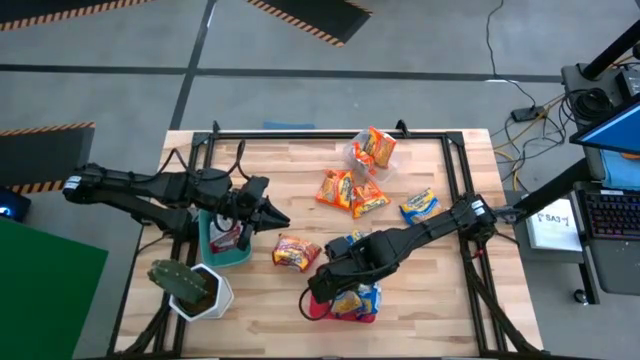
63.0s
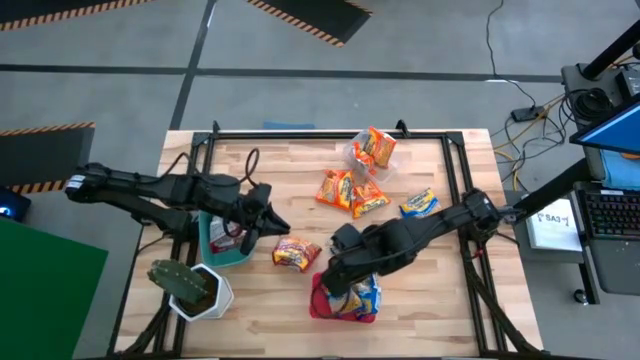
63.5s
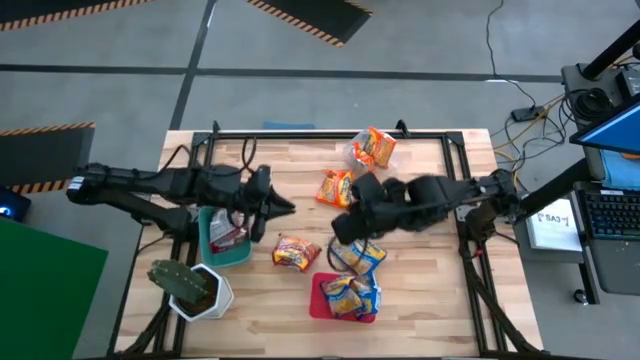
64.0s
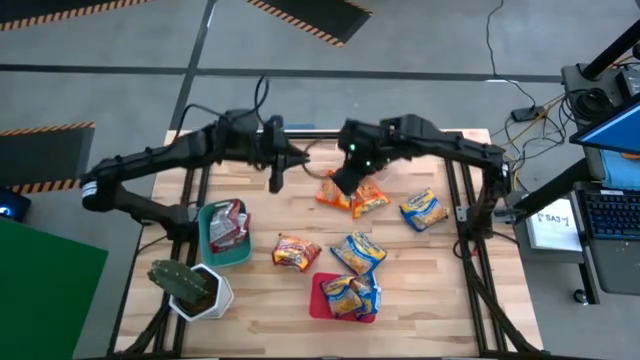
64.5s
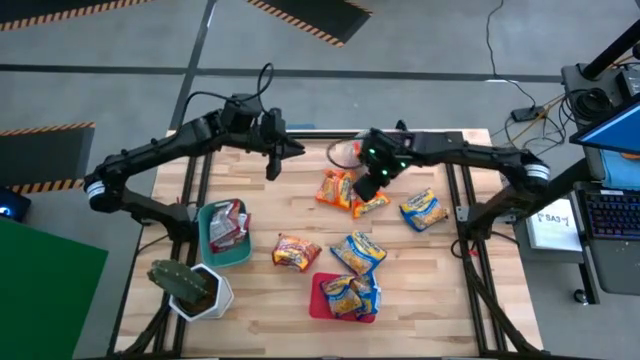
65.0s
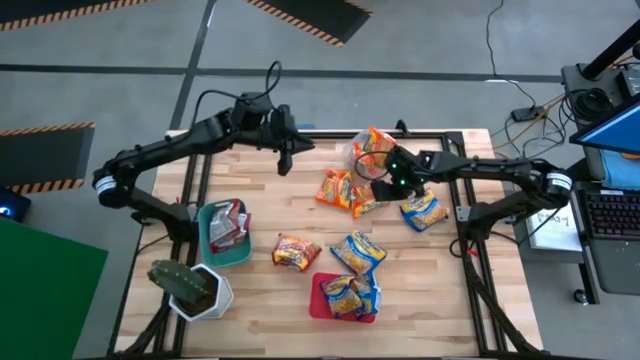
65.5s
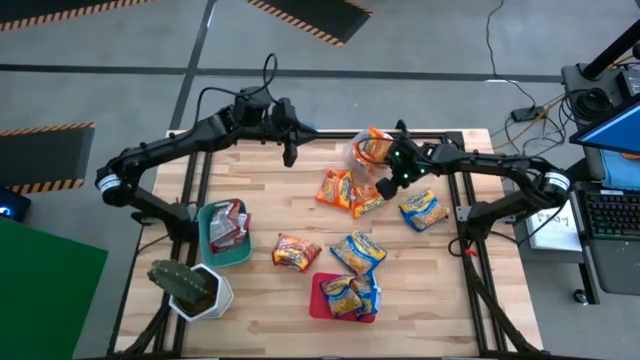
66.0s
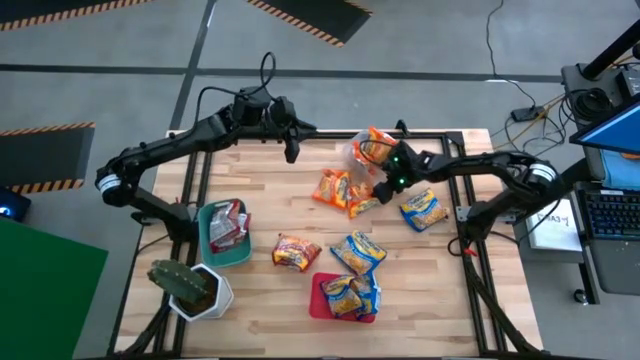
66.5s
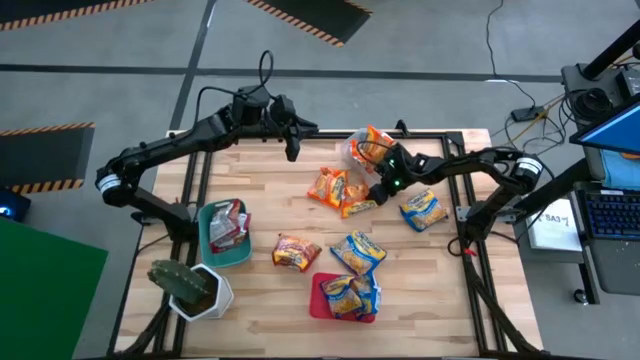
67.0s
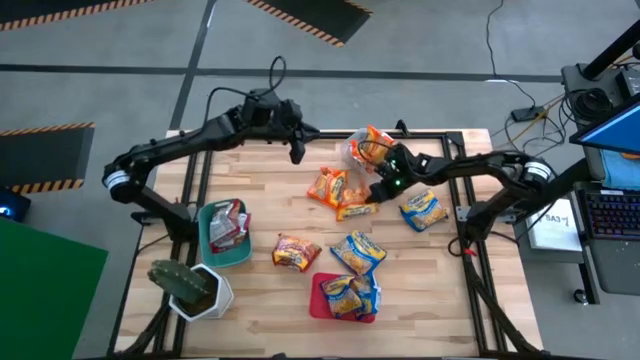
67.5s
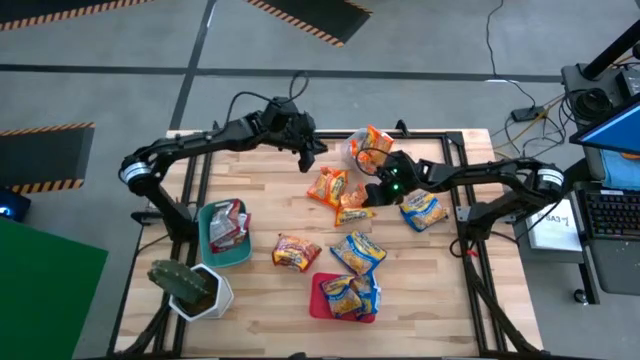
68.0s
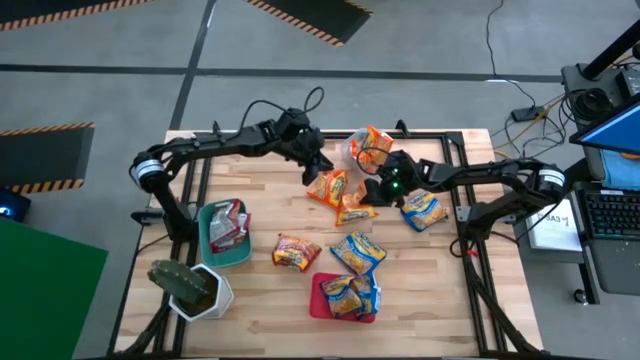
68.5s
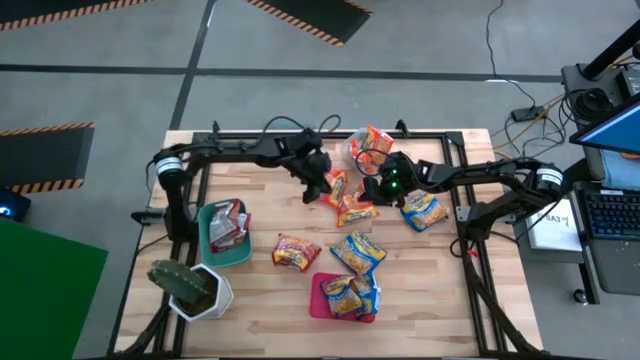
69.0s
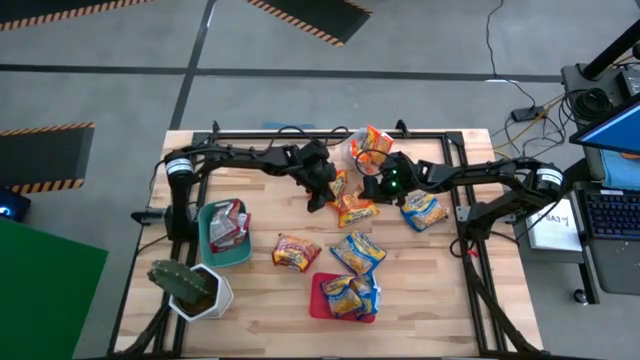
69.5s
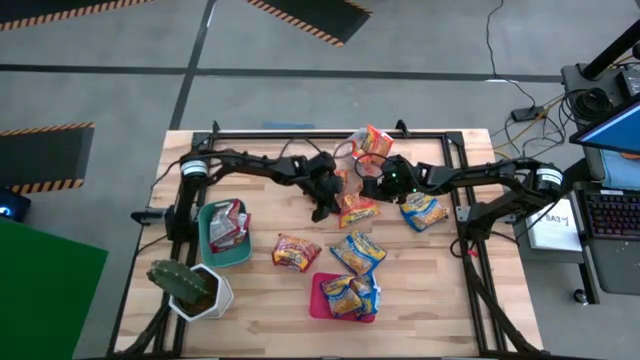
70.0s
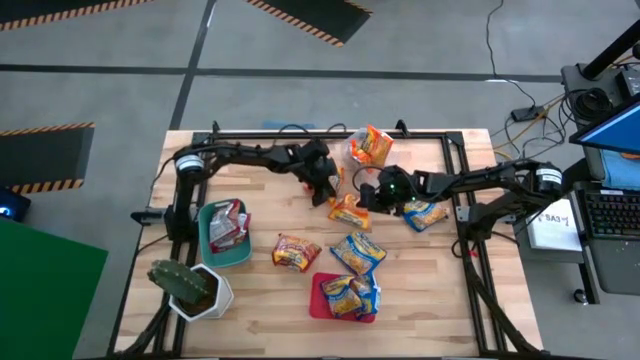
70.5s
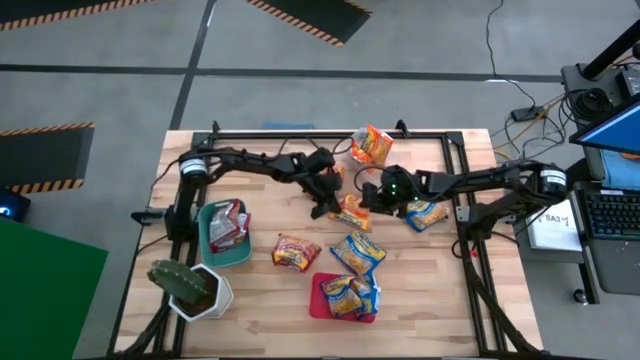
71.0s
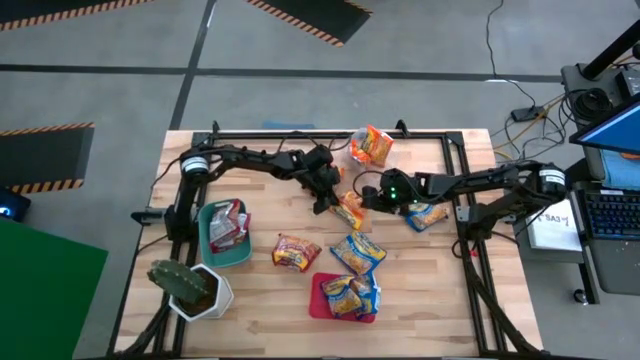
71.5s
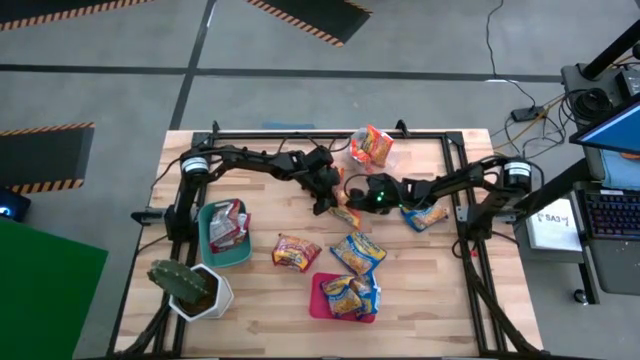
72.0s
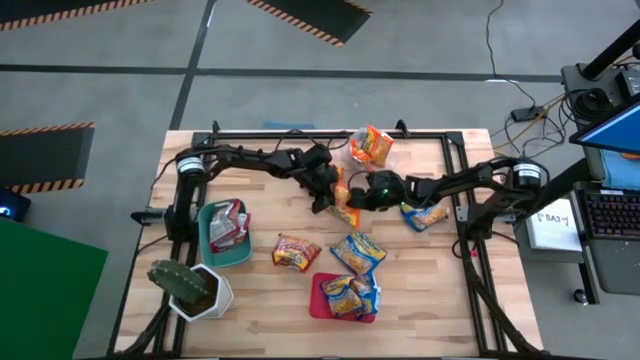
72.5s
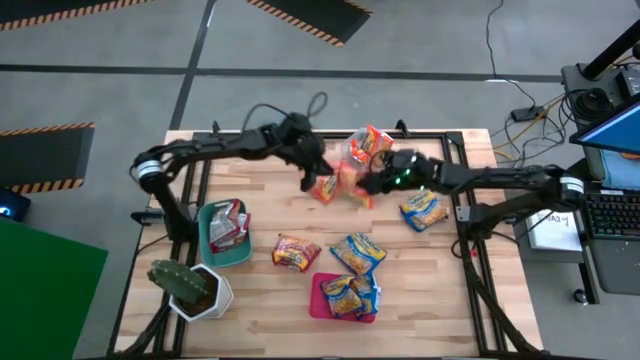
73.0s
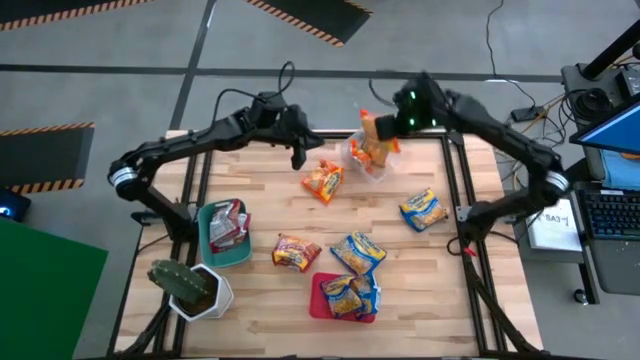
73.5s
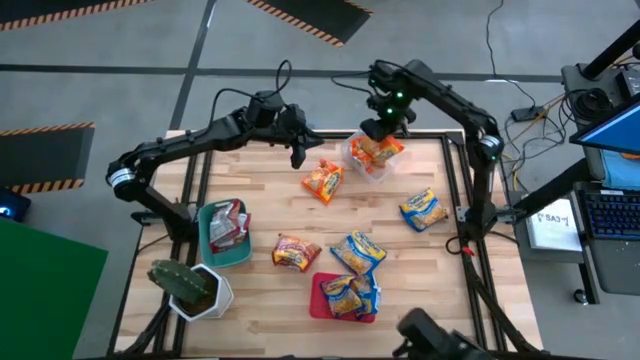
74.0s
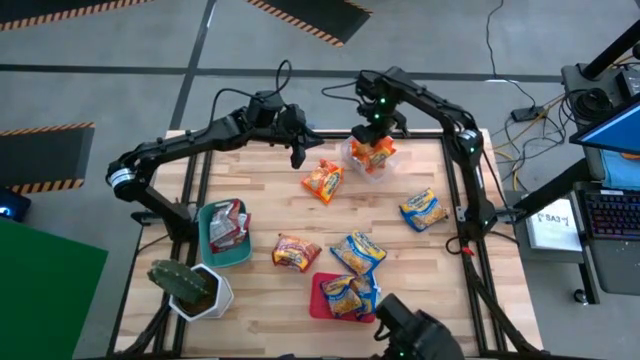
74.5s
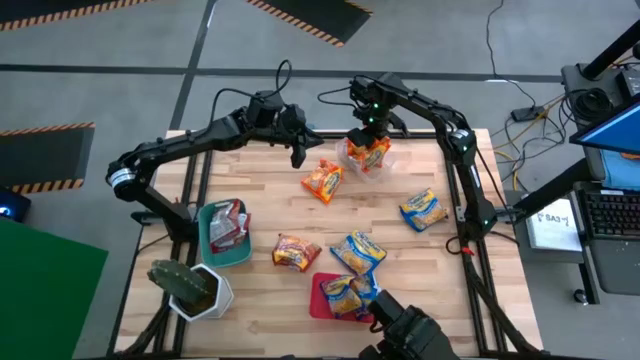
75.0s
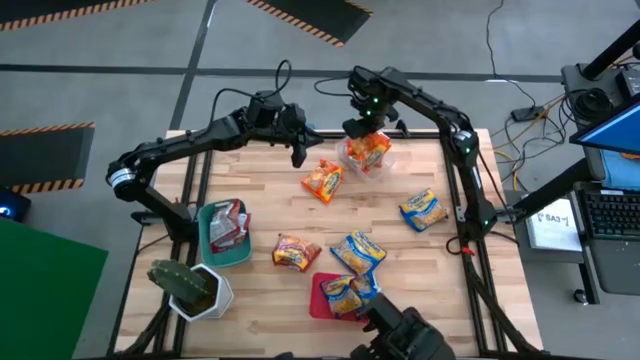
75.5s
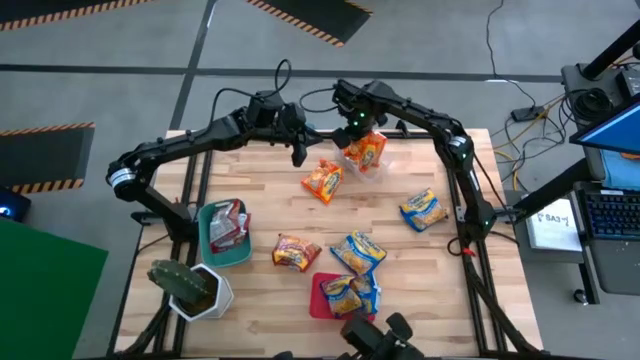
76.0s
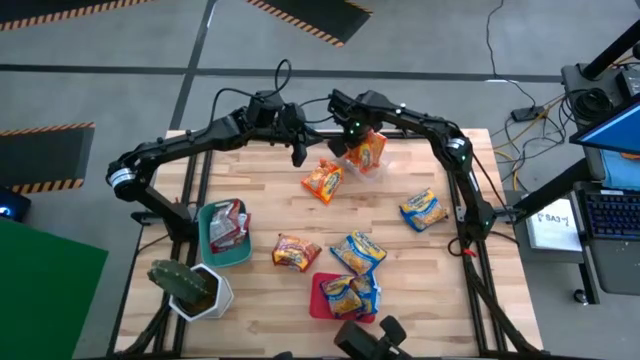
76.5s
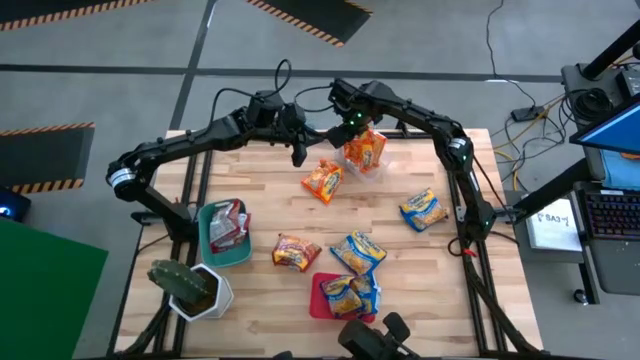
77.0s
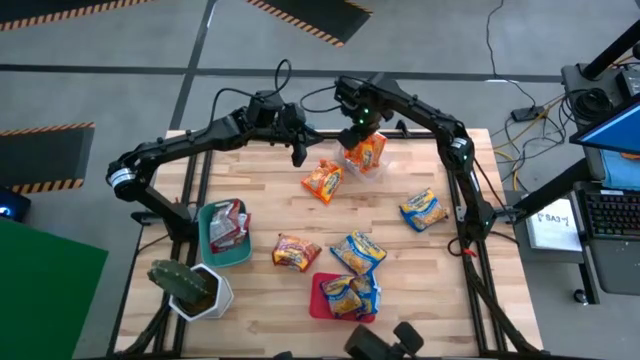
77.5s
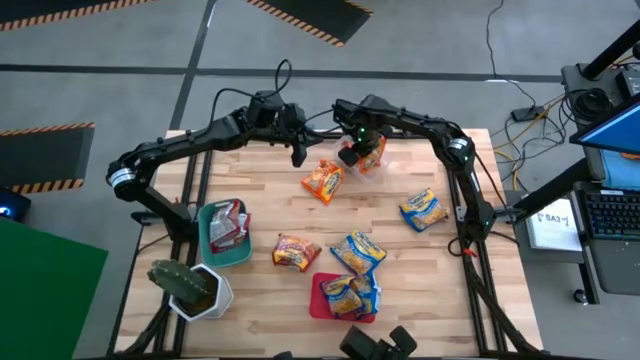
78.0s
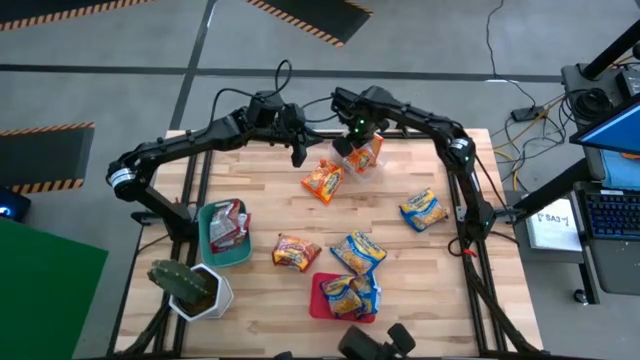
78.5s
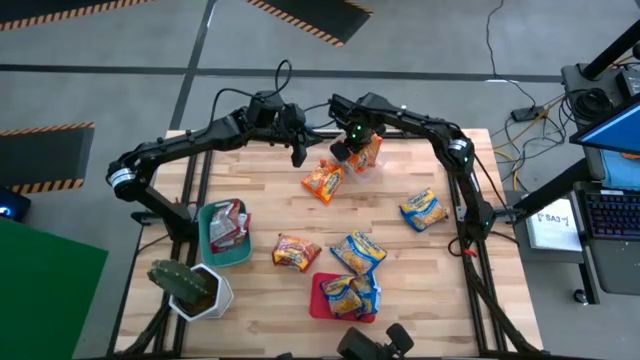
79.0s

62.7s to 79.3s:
Task: Sort Maruchan noodles
Put the right orange noodle pack into the transparent bin

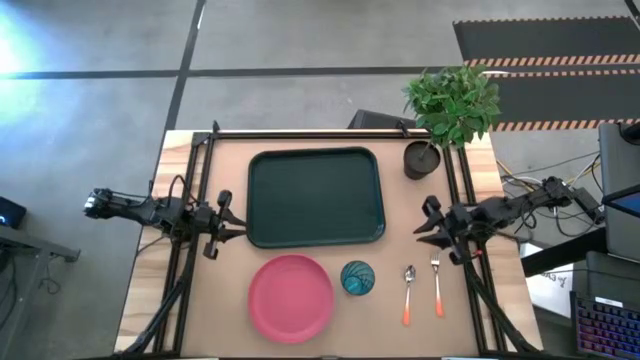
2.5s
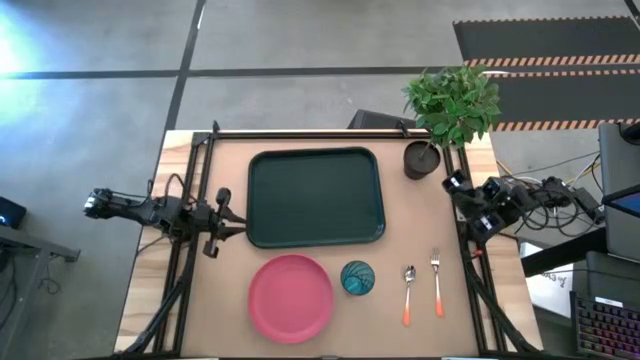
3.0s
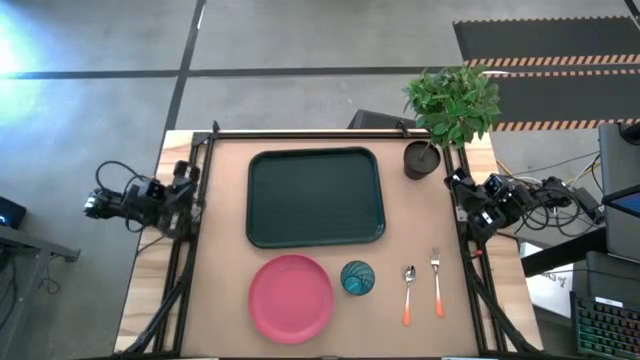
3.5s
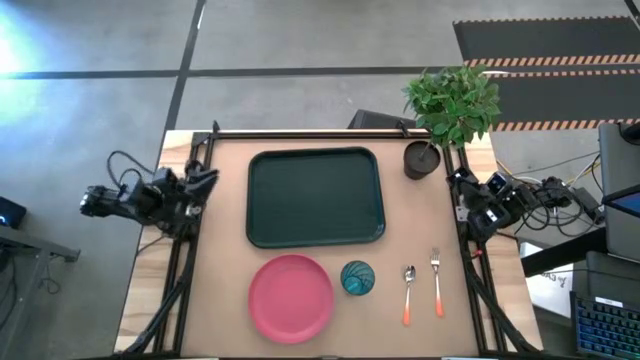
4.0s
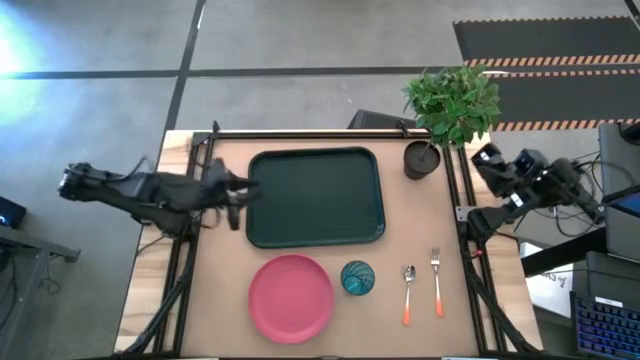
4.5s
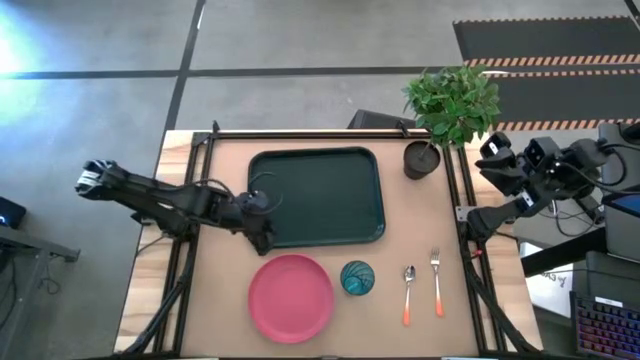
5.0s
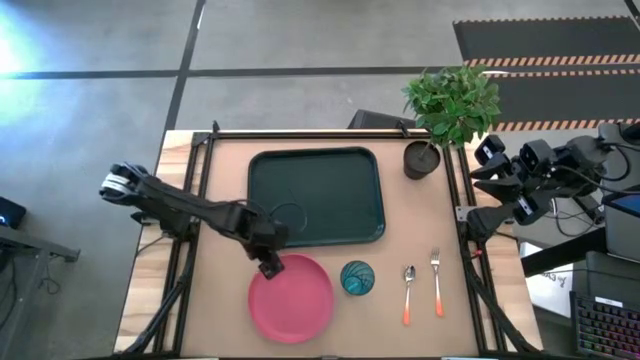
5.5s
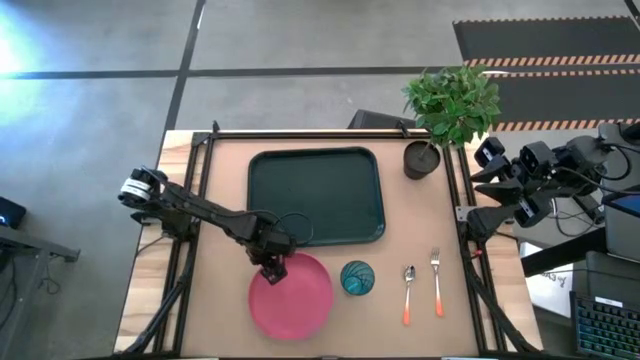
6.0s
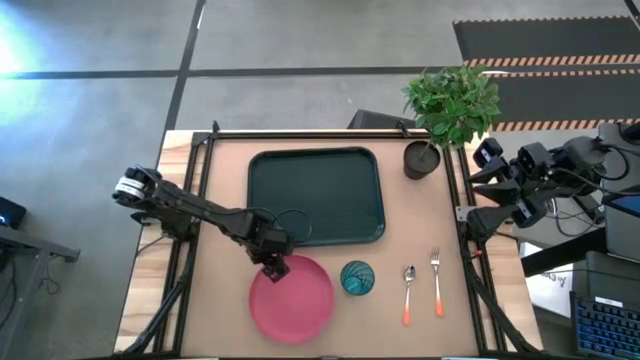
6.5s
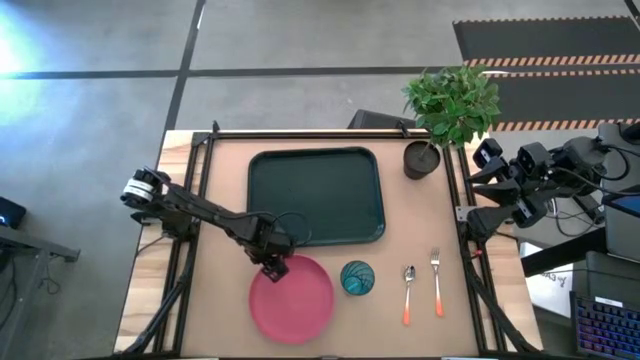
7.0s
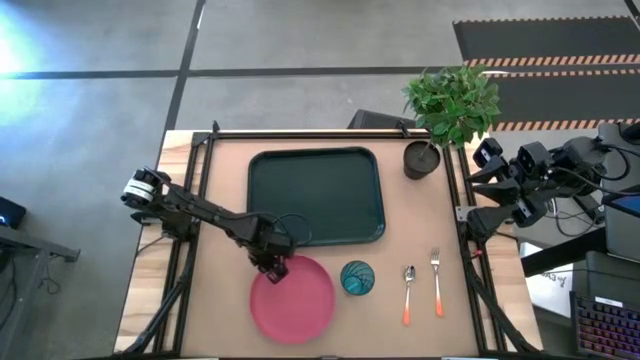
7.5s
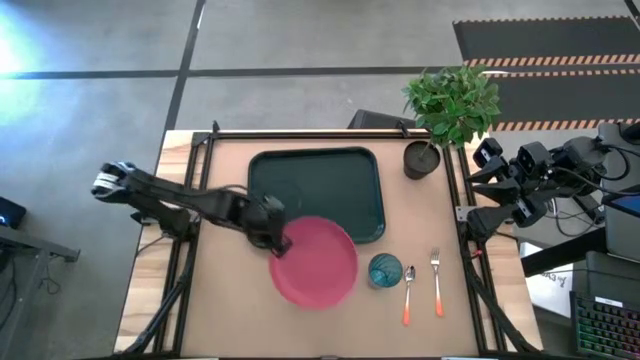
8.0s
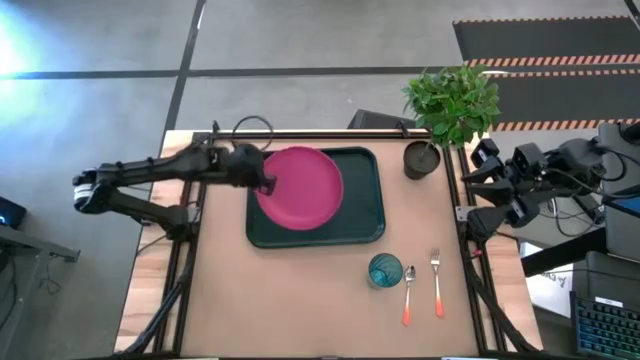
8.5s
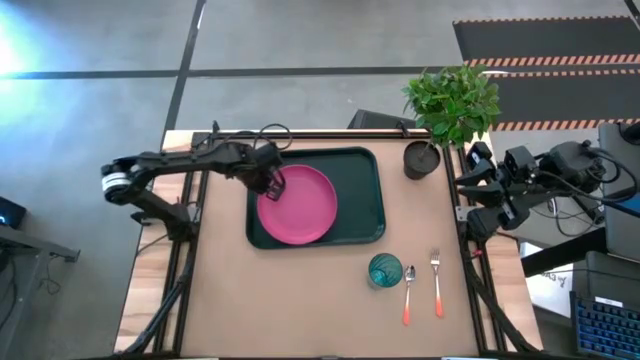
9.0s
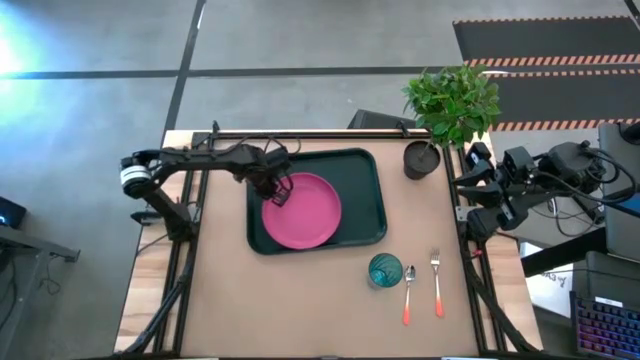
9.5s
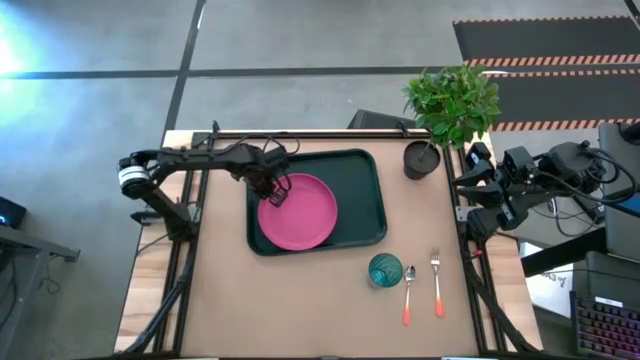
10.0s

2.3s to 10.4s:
Task: Pick and place plate/cup/fork/spoon on tray
Put the pink plate on the left of the black serving tray
